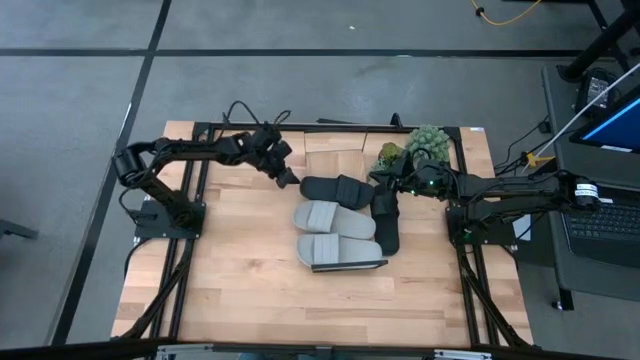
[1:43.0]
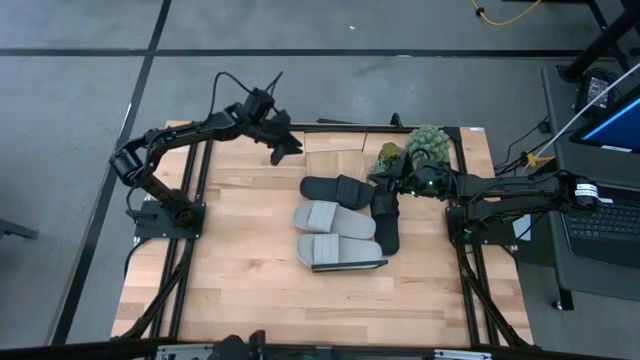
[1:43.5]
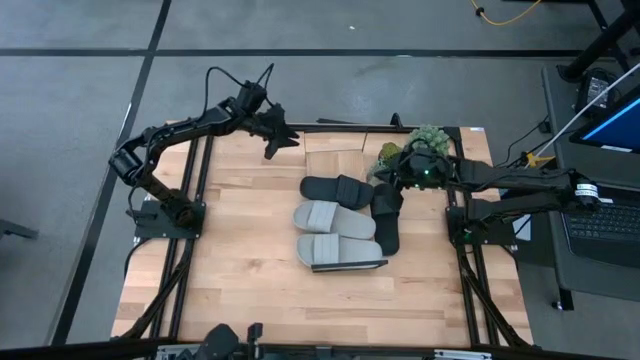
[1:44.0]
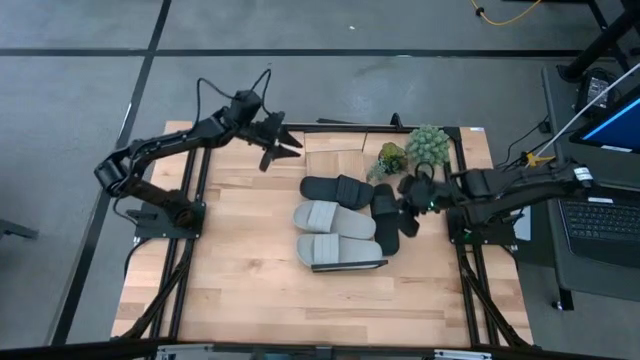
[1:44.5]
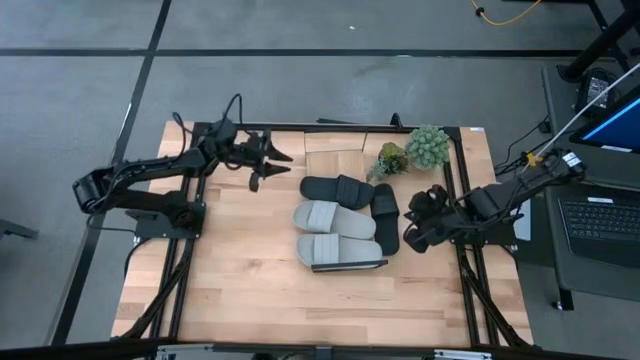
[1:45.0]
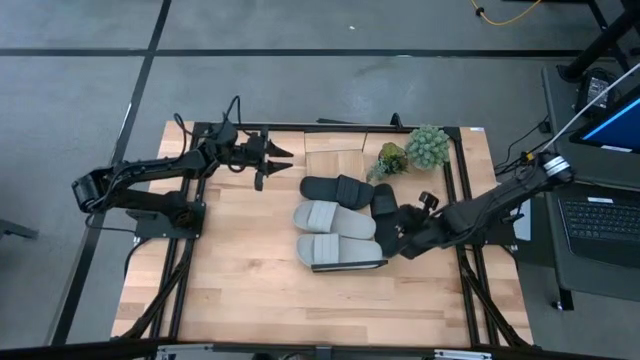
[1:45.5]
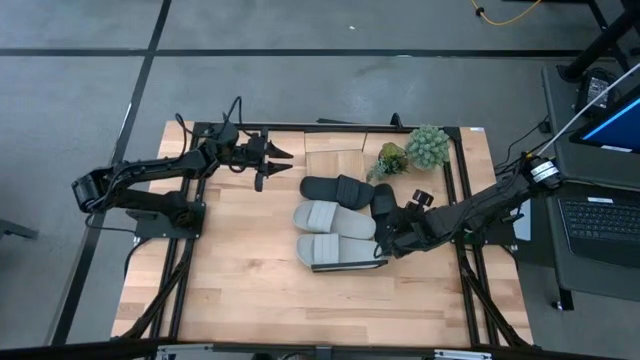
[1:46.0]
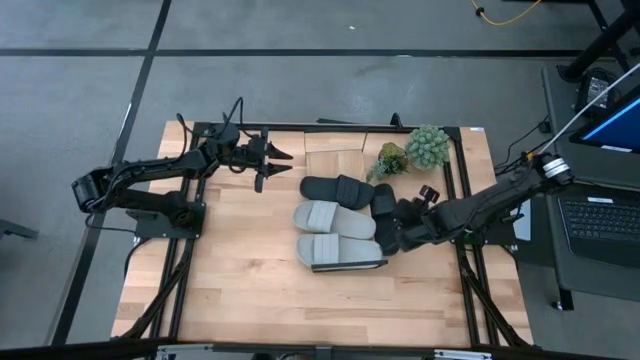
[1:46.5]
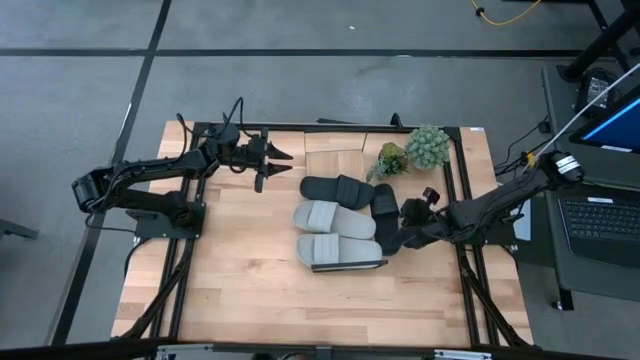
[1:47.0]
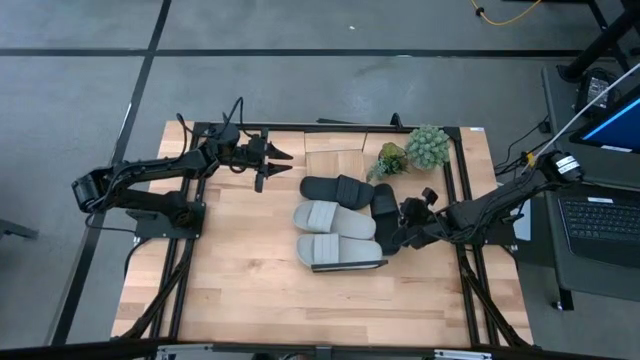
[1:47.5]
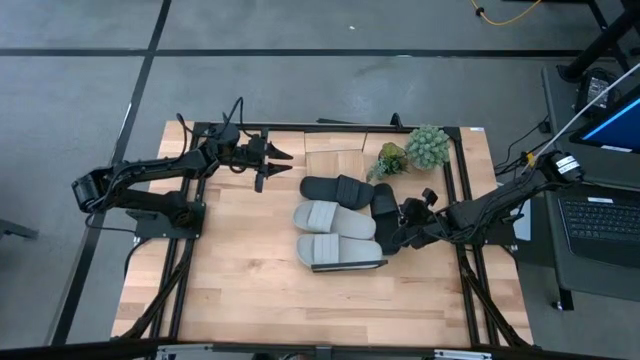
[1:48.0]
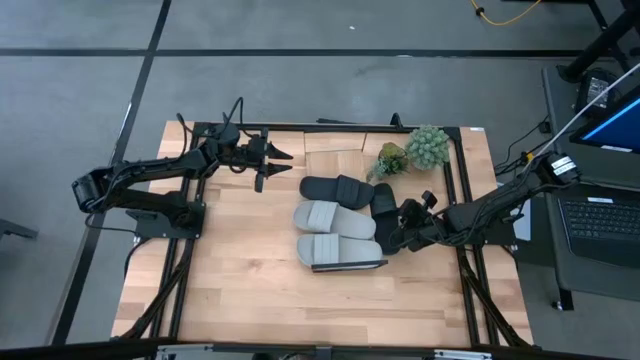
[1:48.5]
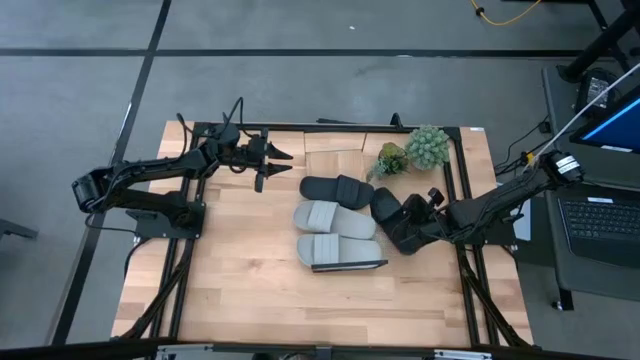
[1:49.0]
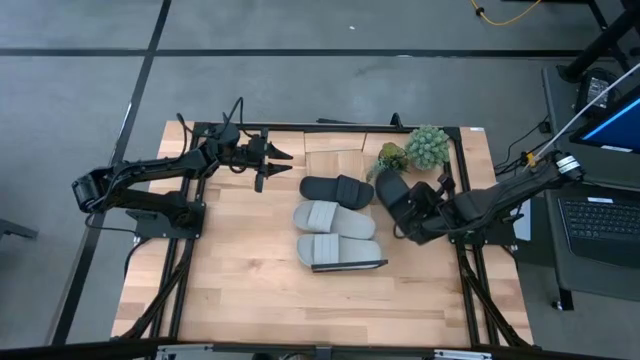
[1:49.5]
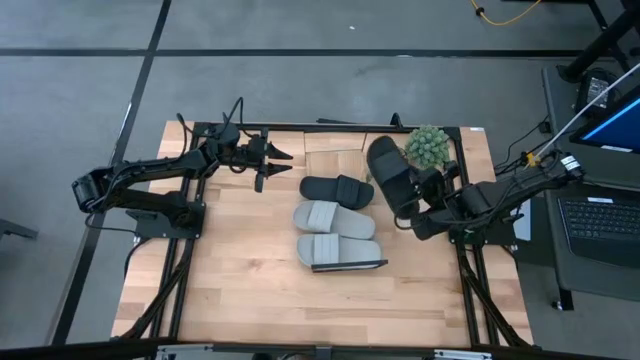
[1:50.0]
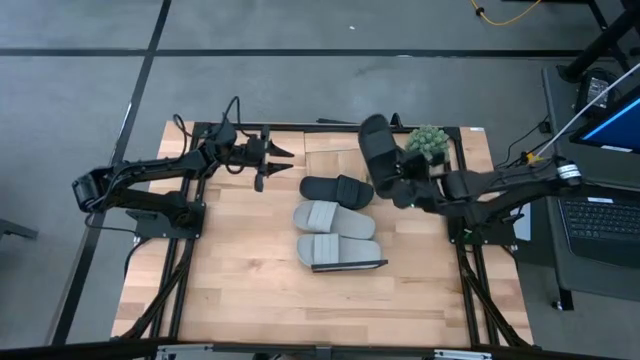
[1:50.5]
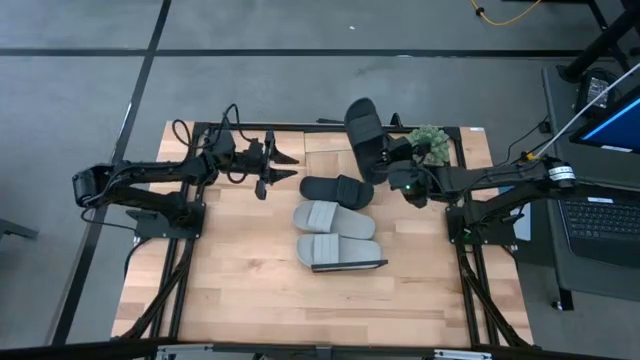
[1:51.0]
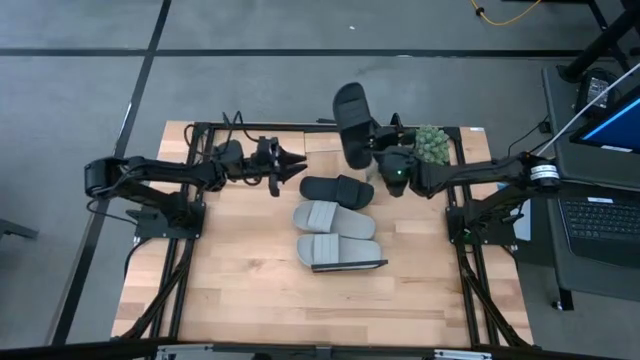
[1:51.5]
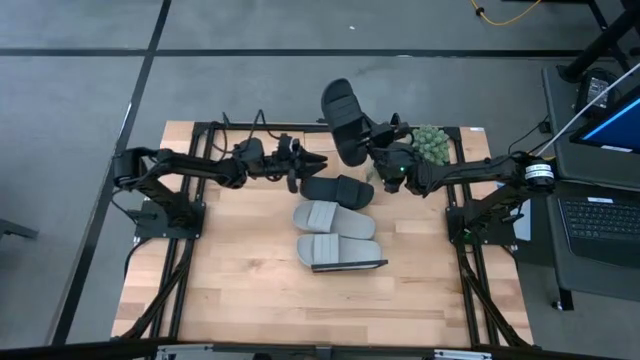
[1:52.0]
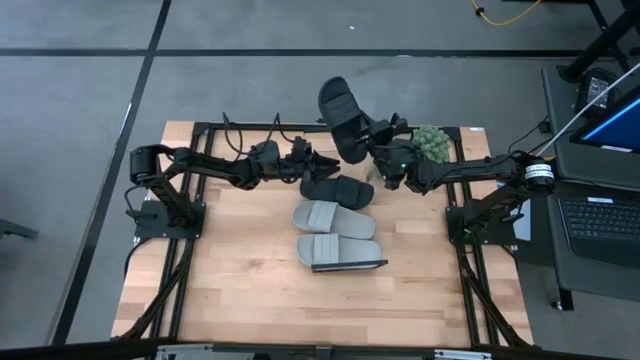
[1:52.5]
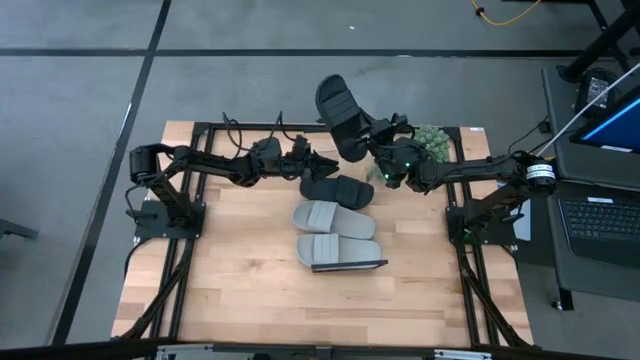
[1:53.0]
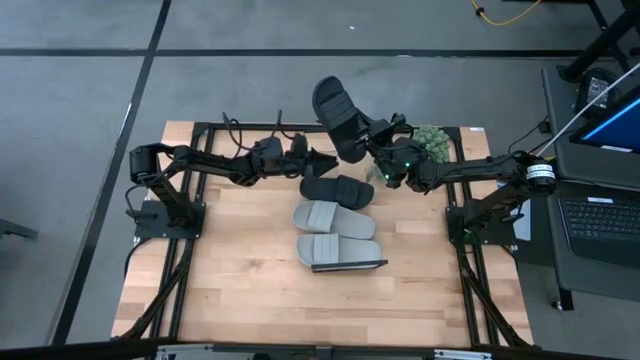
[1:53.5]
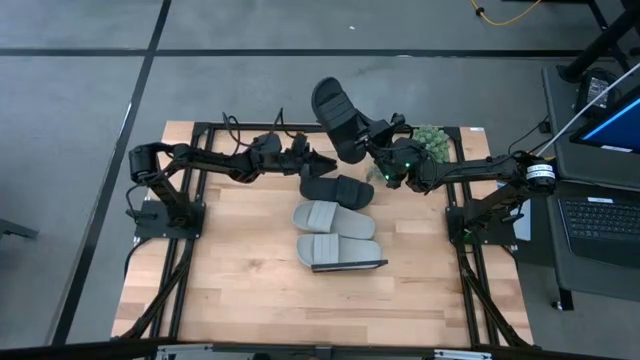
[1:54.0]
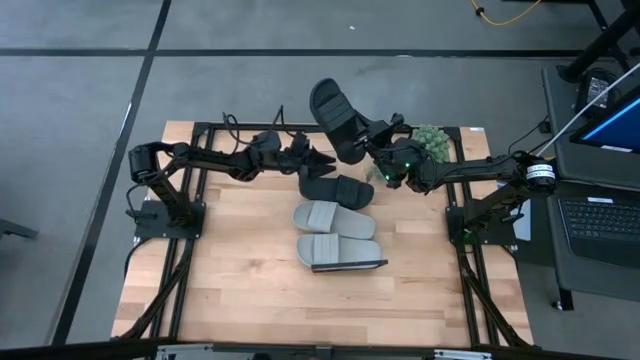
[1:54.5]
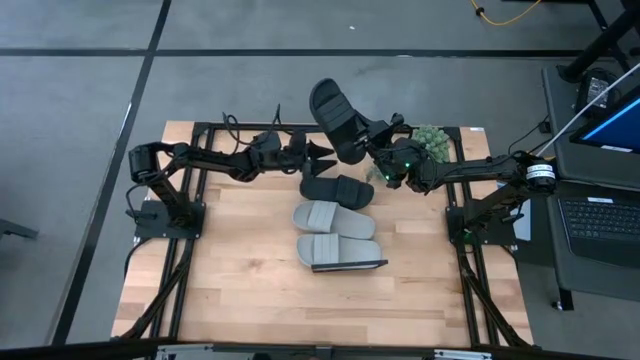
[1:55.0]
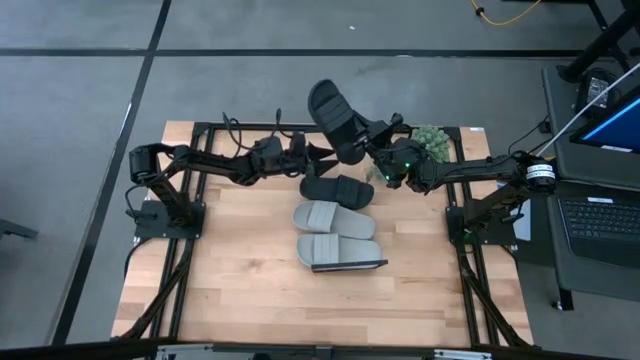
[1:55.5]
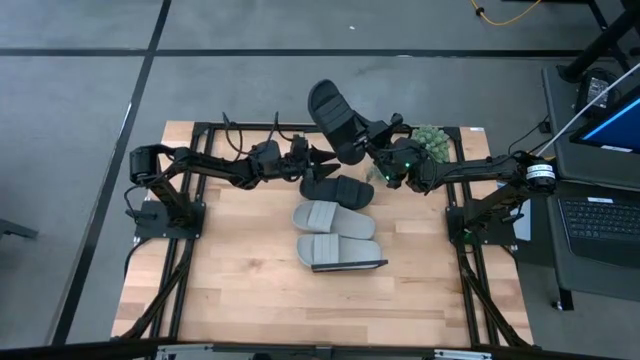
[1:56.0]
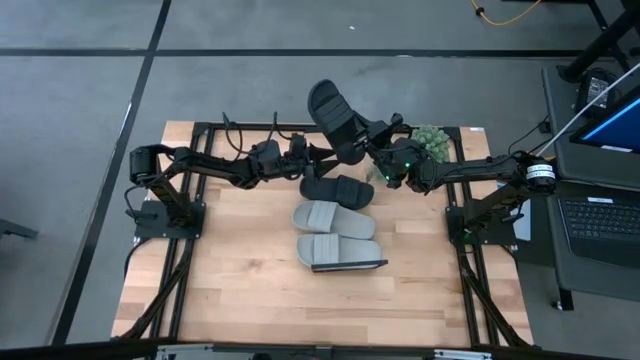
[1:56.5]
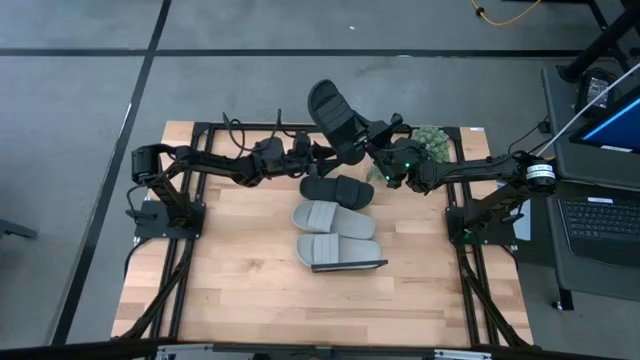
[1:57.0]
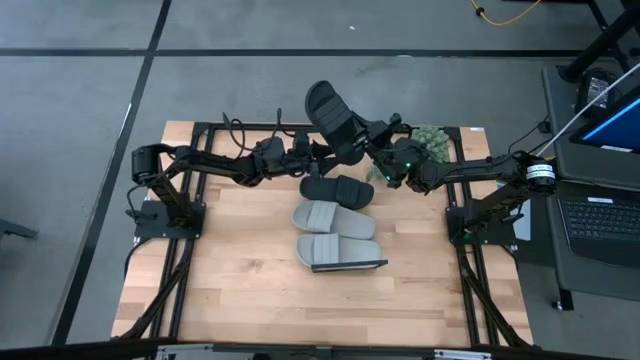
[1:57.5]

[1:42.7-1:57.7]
Task: Pick and place slides into the shelf
Put the black slipper on the shelf

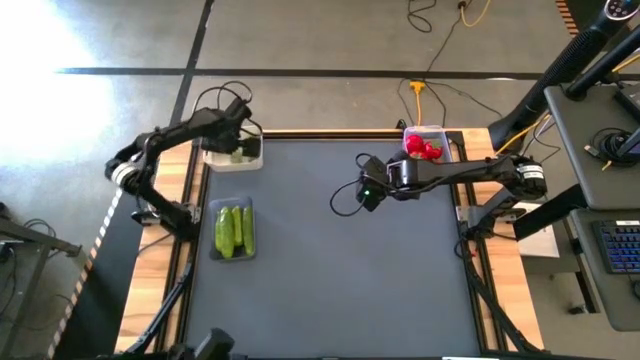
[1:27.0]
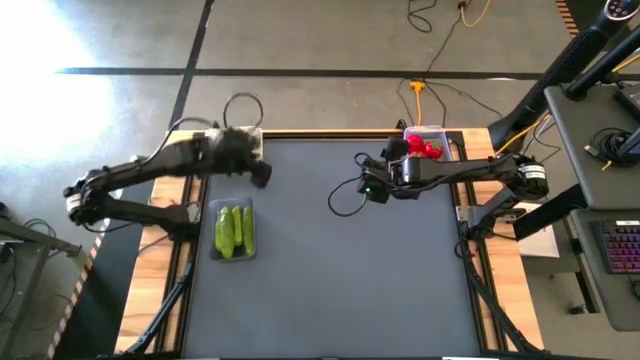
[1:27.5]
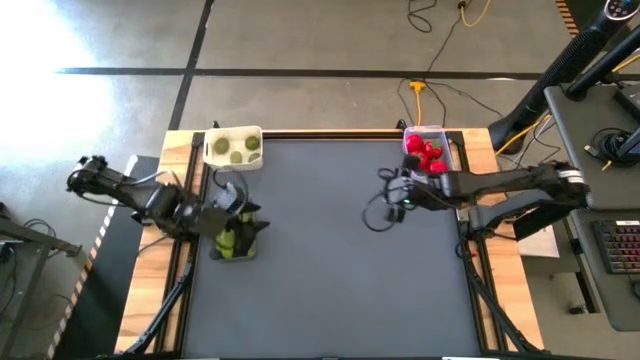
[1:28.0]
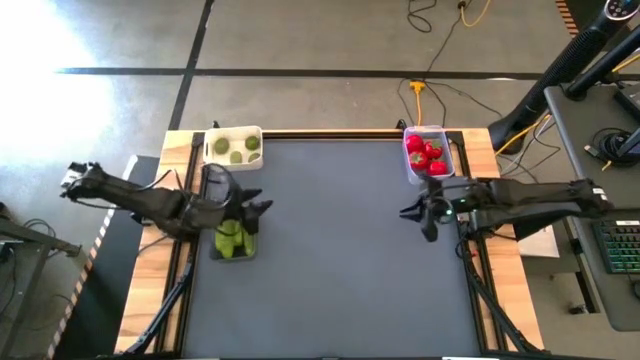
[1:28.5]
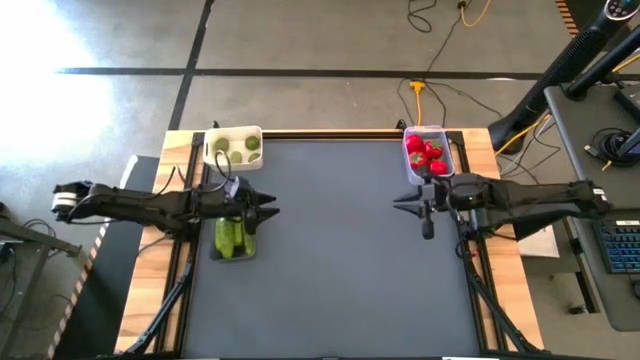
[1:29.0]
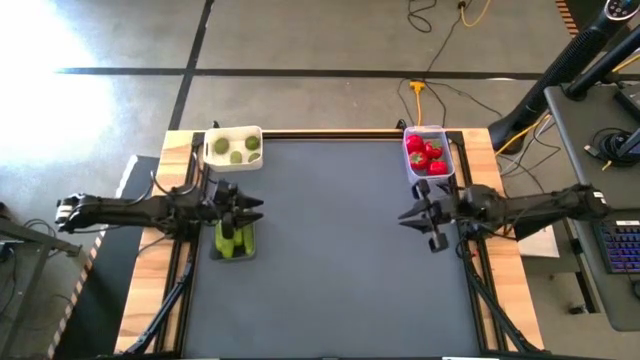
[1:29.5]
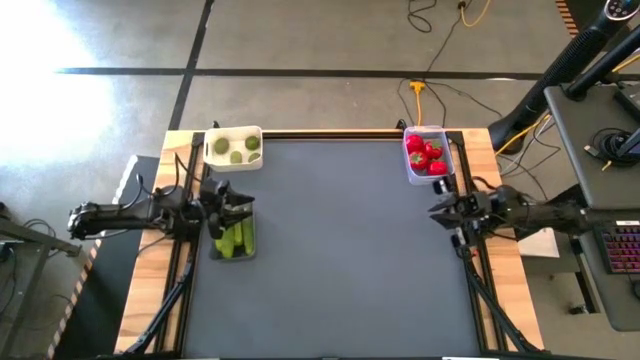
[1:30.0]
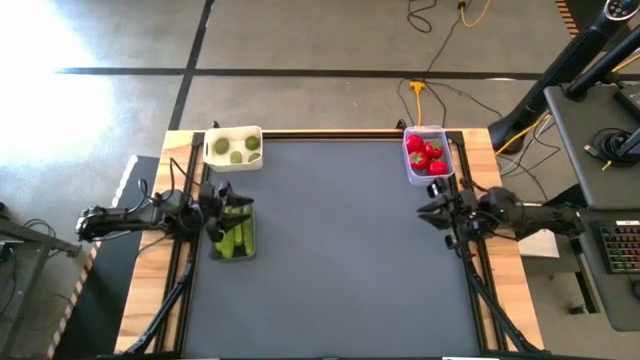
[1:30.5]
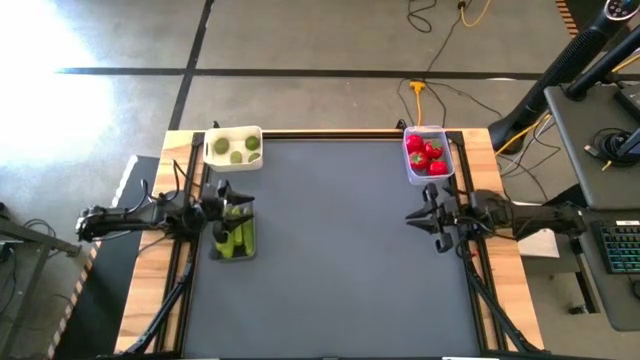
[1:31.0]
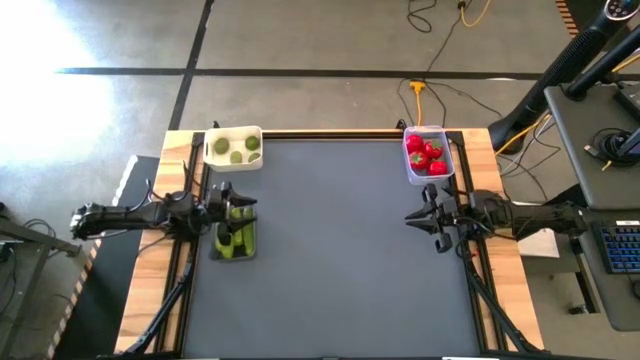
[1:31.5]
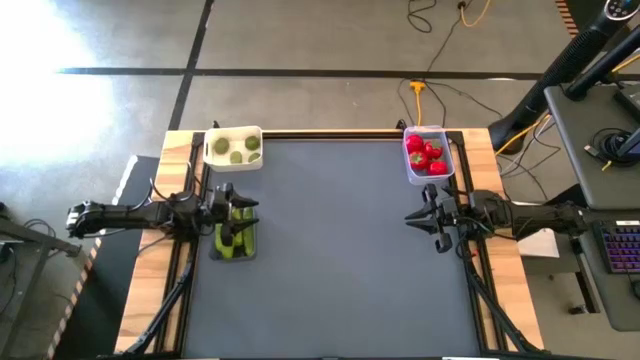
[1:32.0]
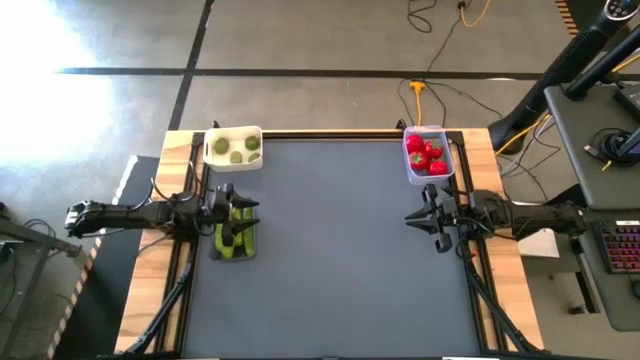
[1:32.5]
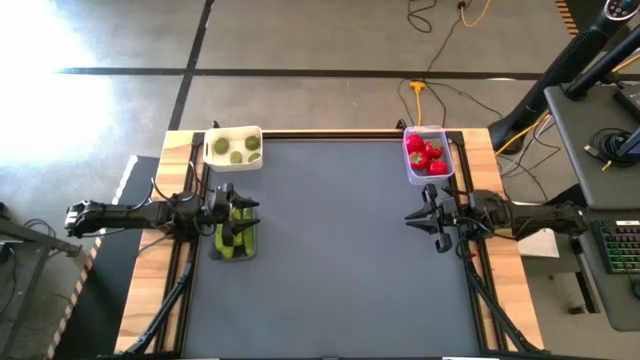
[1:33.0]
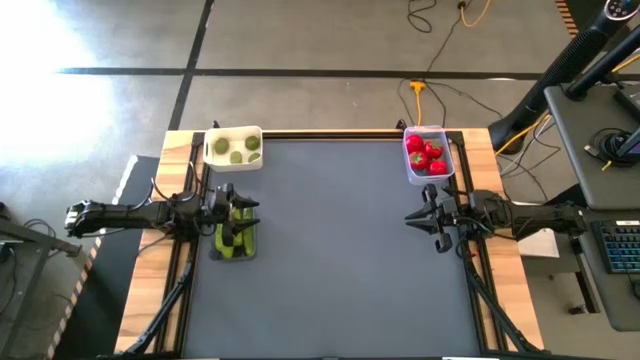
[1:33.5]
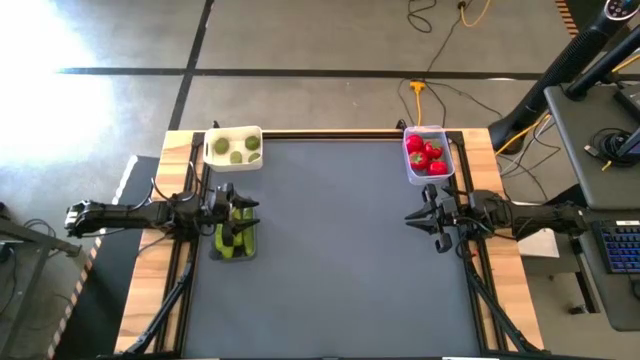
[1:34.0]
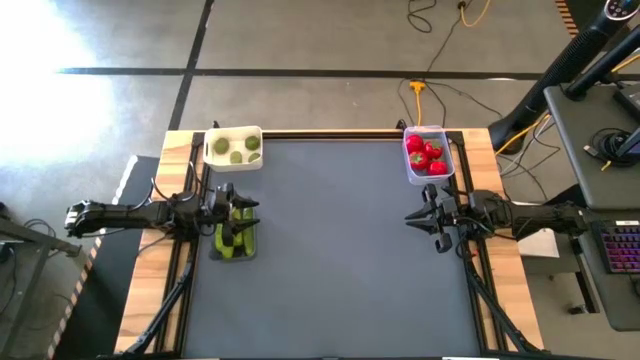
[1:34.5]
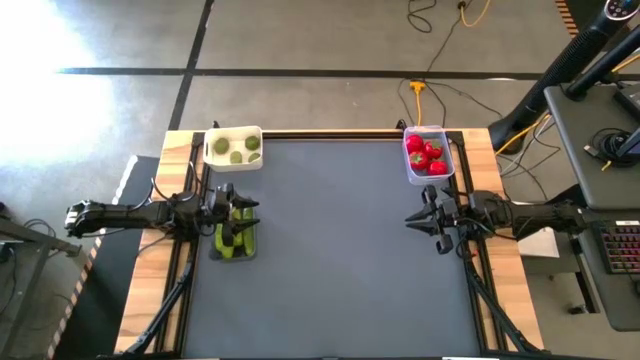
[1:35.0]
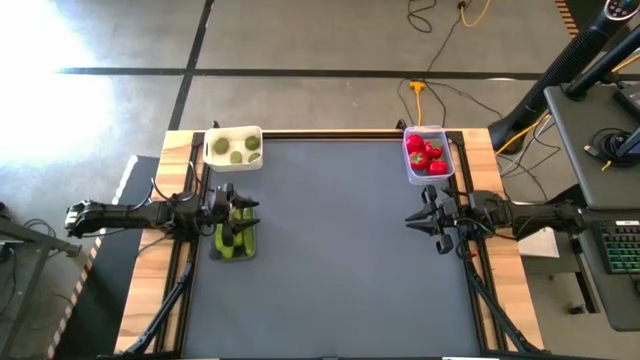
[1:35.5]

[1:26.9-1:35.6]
Task: Sort produce into baskets
Return to Home Position
